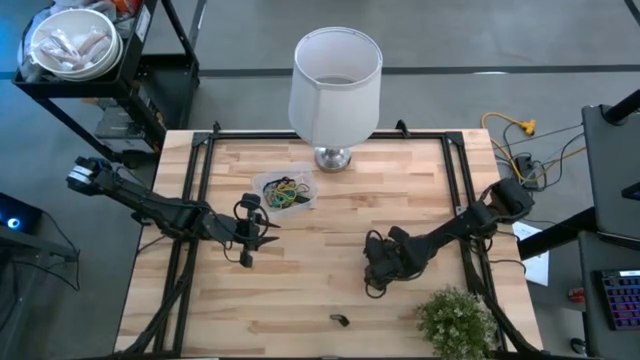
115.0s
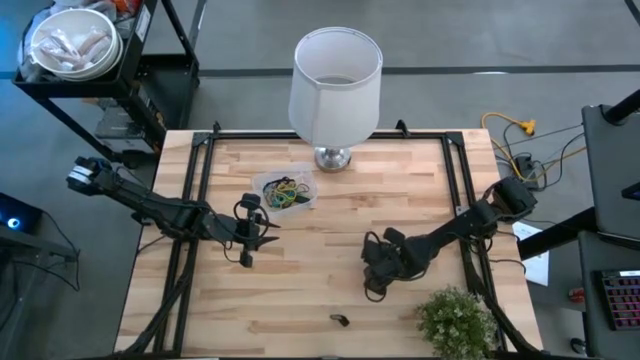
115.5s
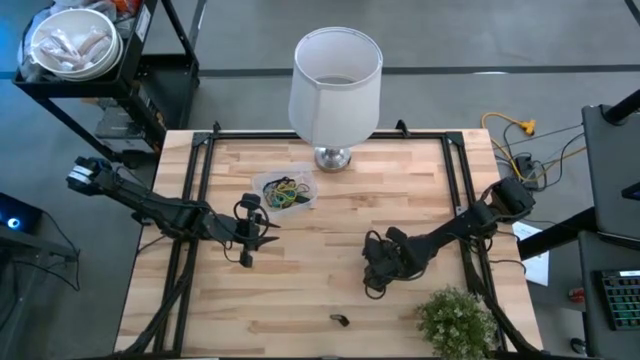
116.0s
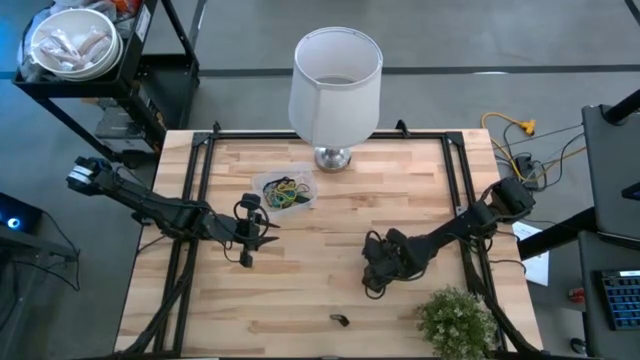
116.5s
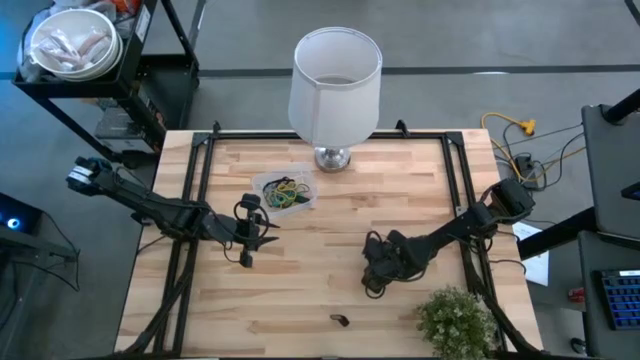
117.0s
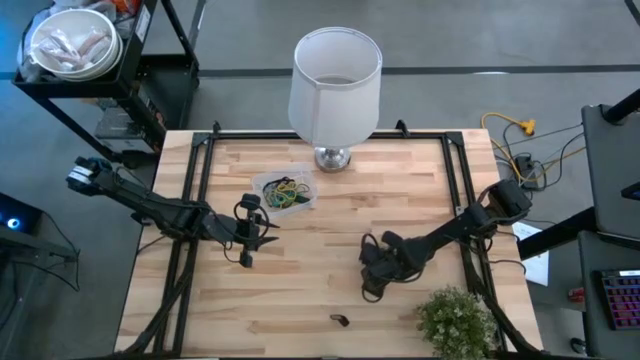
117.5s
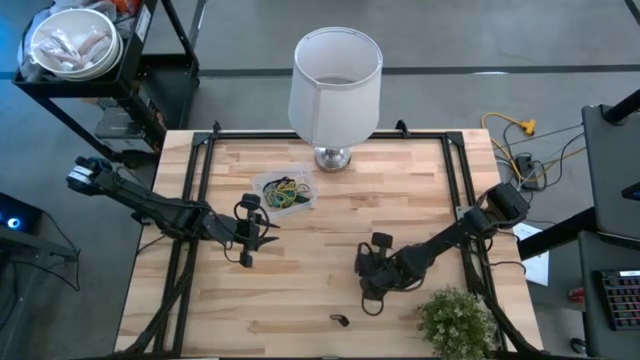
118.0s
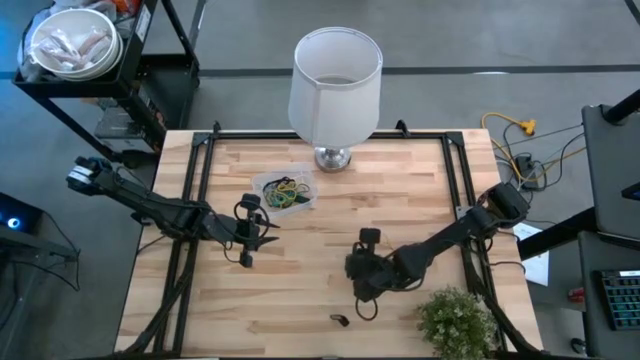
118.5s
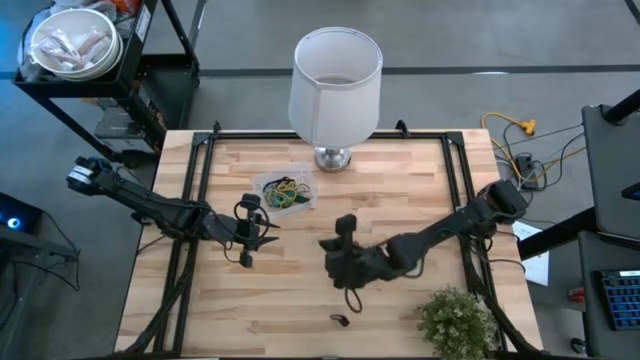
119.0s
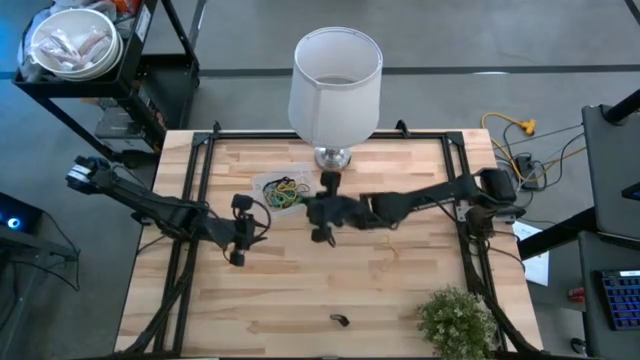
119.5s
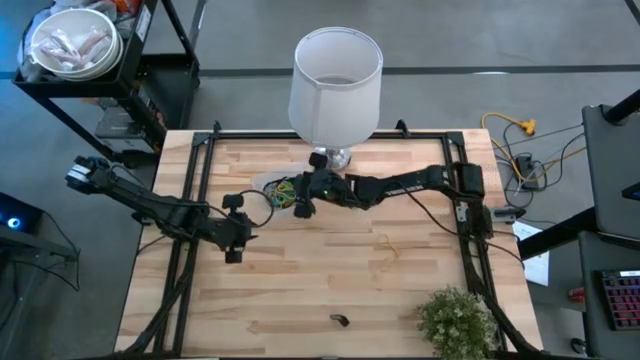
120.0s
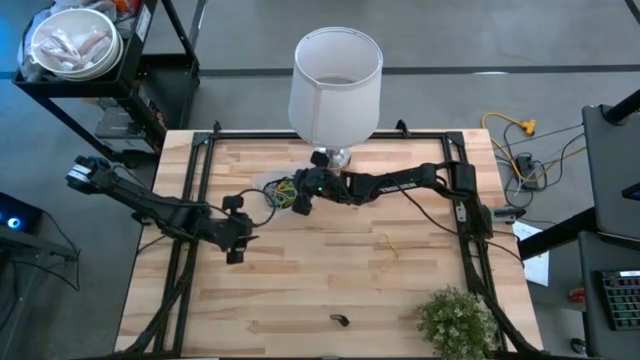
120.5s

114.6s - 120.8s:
Task: Pick and place rubber bands into bin
Put the green rubber band into the transparent bin

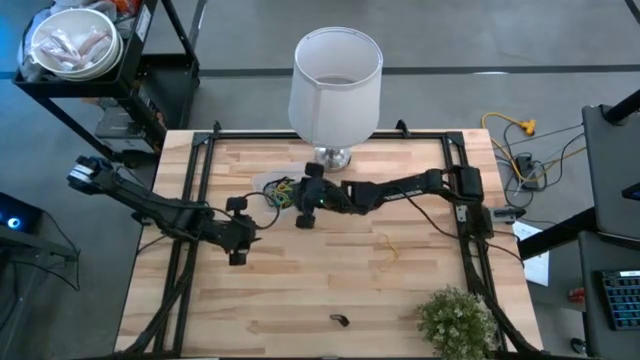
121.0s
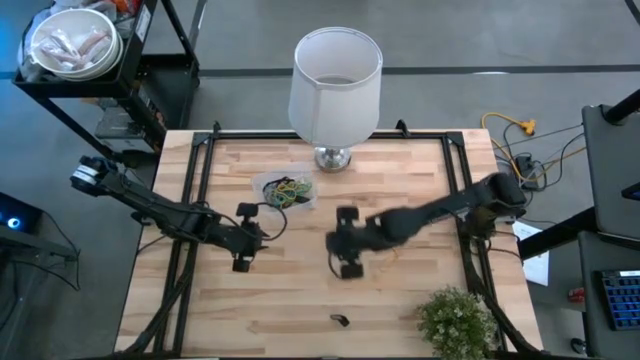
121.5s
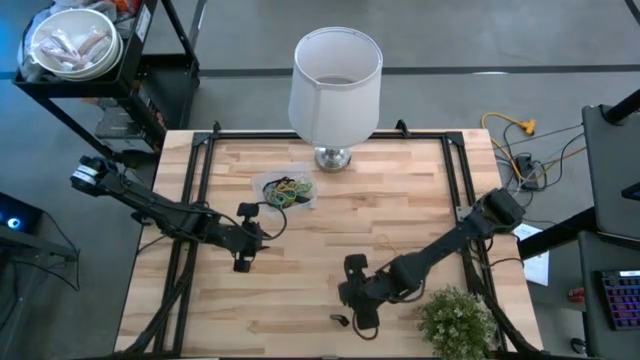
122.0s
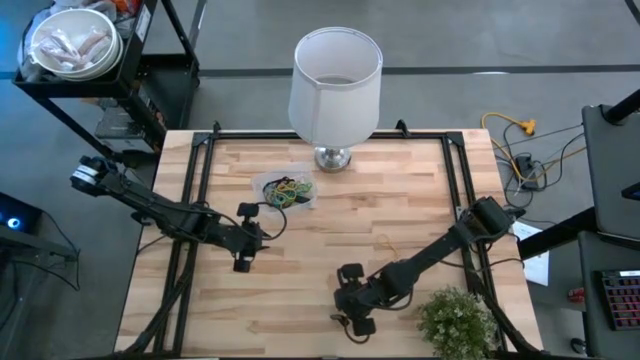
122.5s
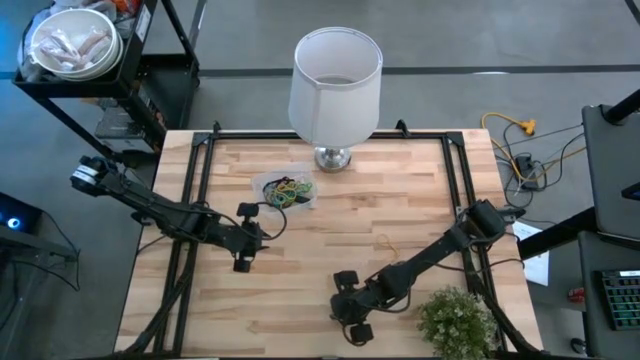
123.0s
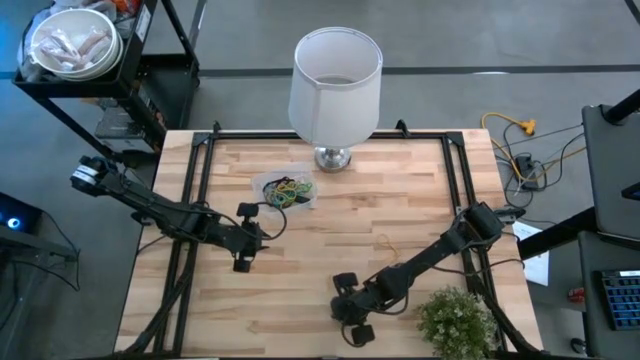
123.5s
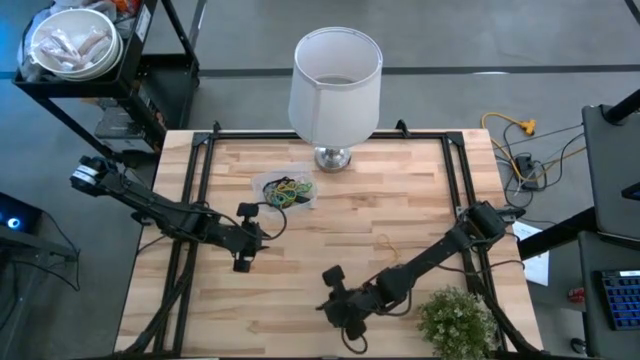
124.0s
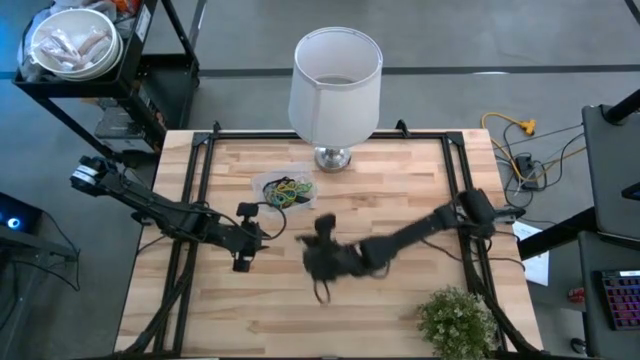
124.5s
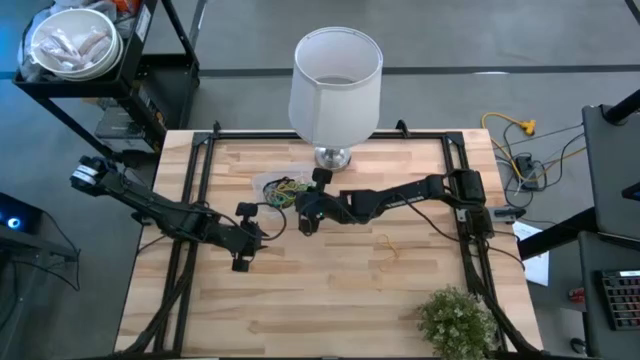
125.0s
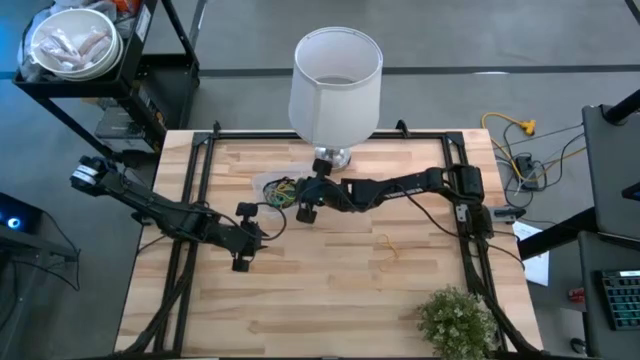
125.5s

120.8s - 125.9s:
Put the black rubber band into the transparent bin

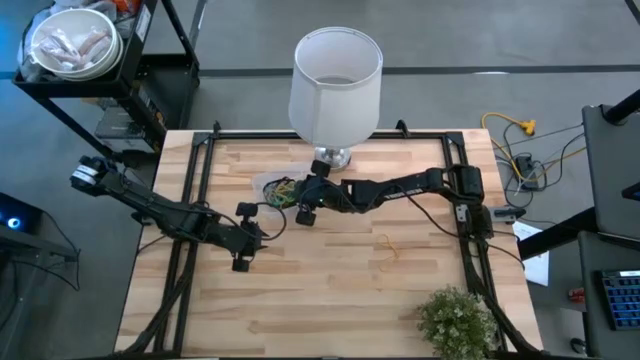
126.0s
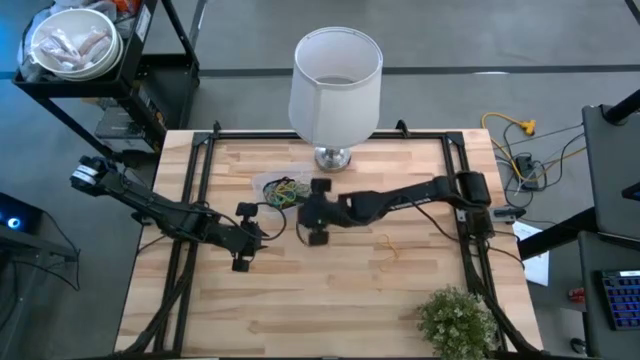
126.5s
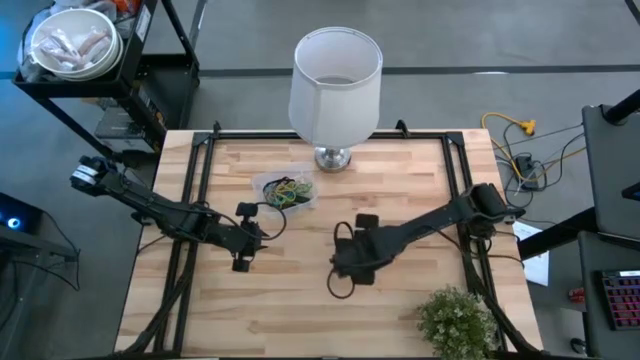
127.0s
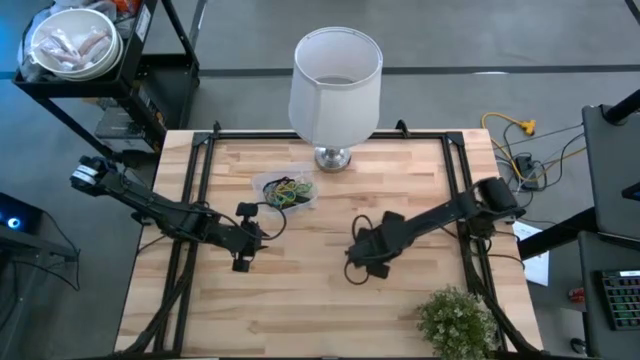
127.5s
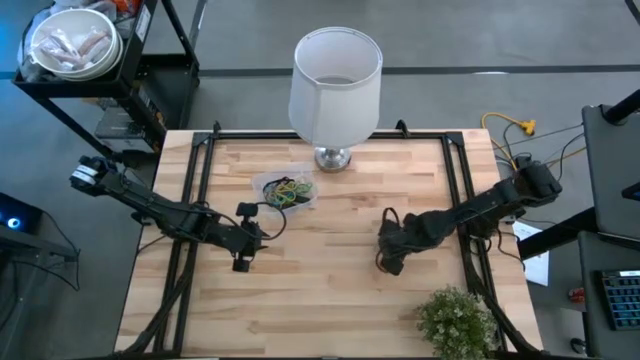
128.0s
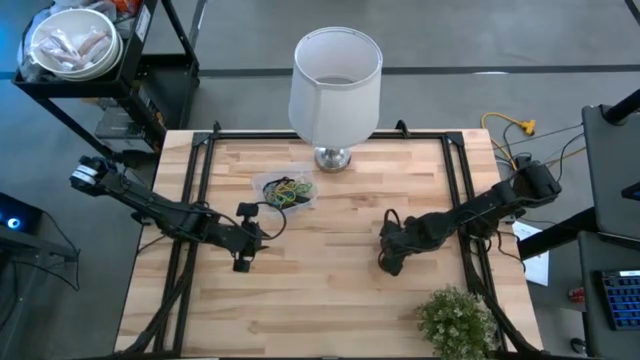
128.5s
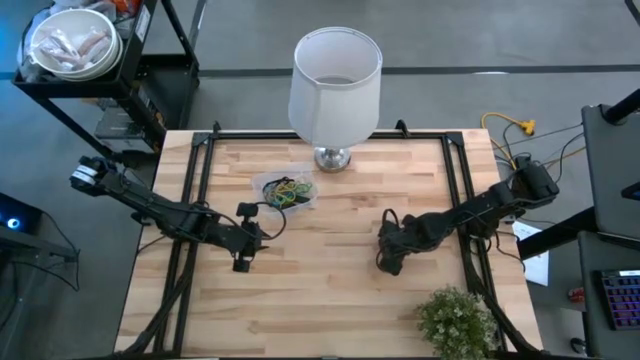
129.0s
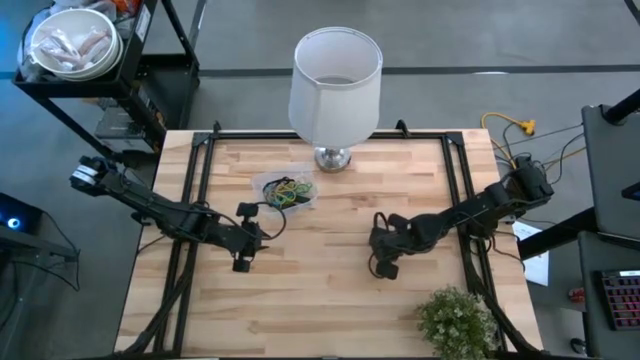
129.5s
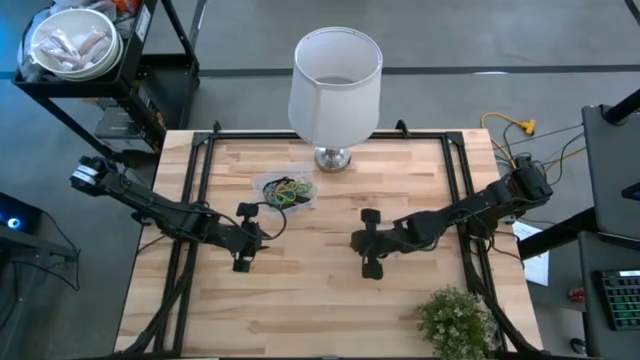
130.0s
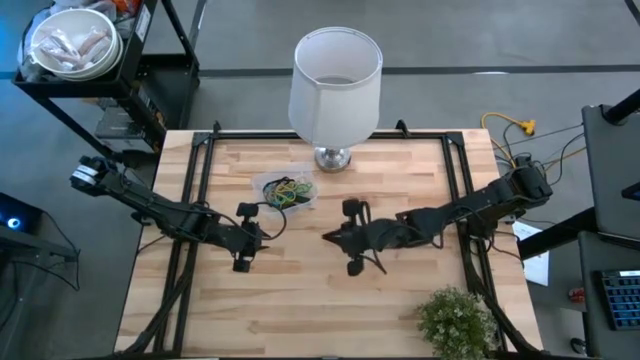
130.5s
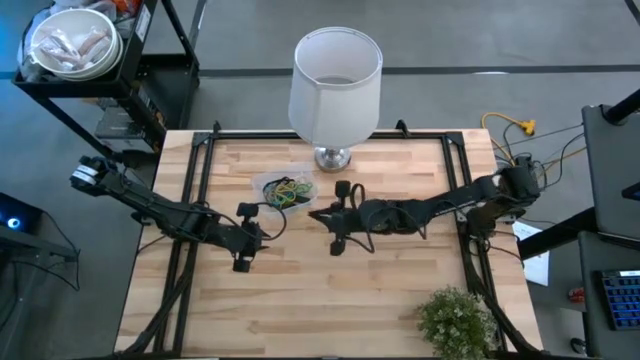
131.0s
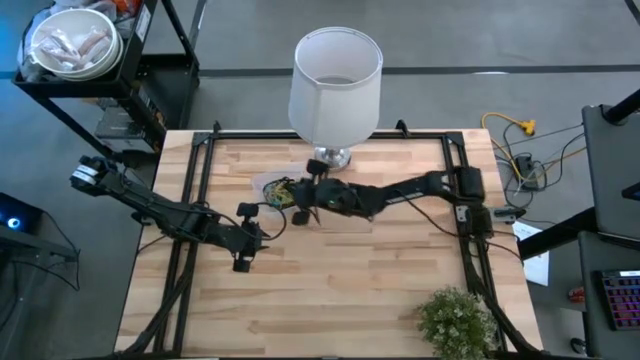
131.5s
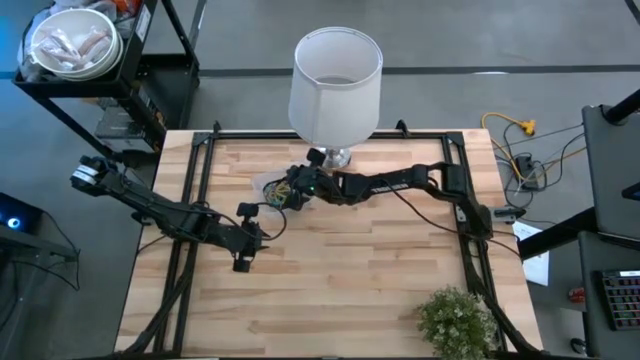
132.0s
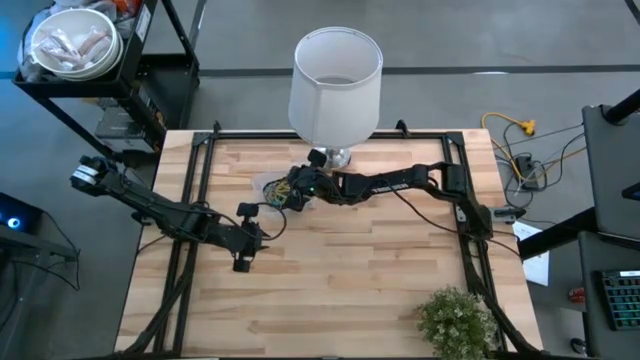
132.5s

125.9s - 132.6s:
Put the yellow rubber band into the transparent bin

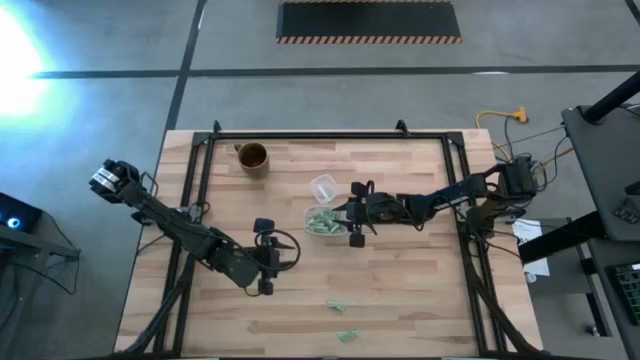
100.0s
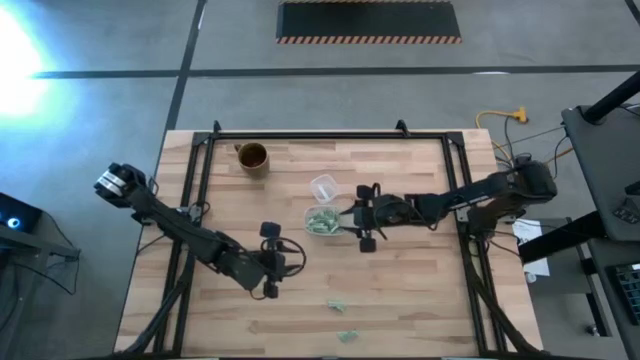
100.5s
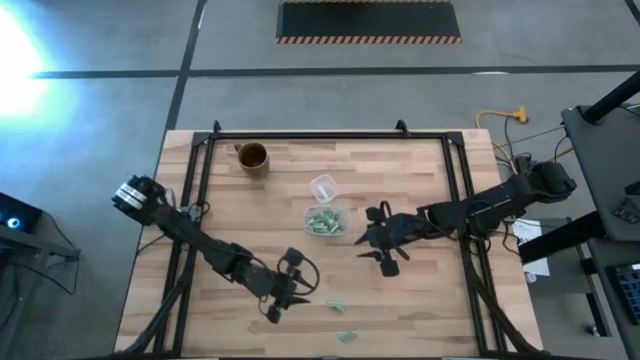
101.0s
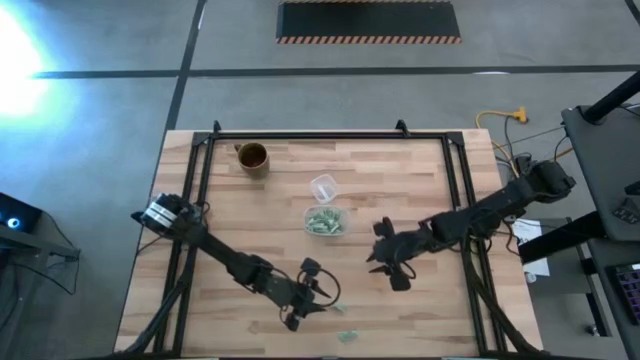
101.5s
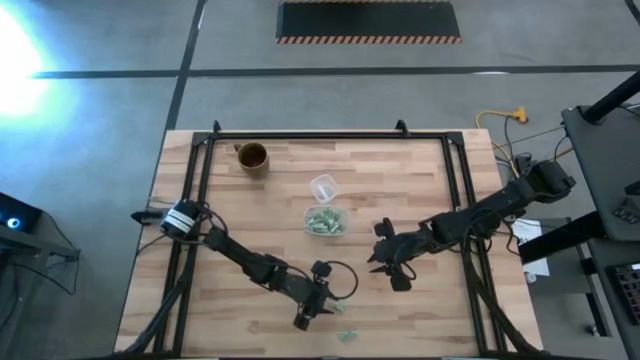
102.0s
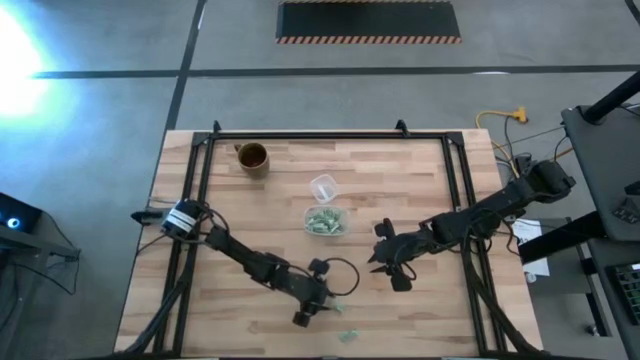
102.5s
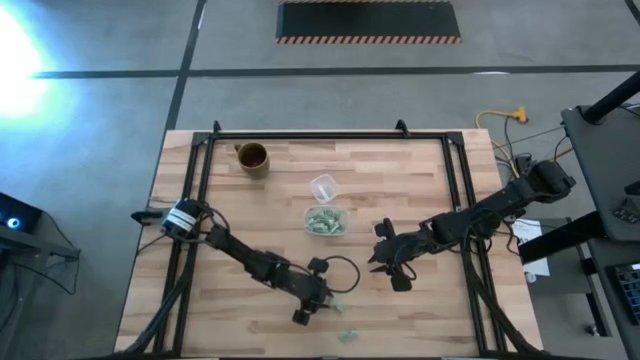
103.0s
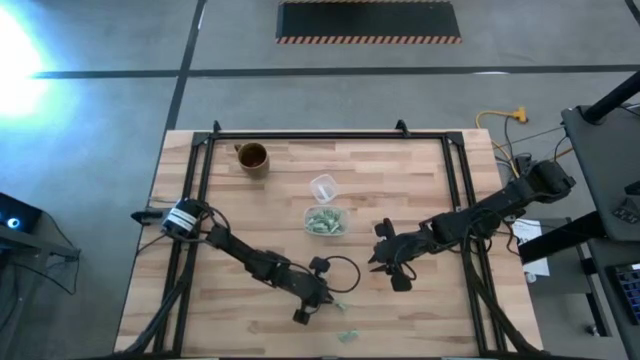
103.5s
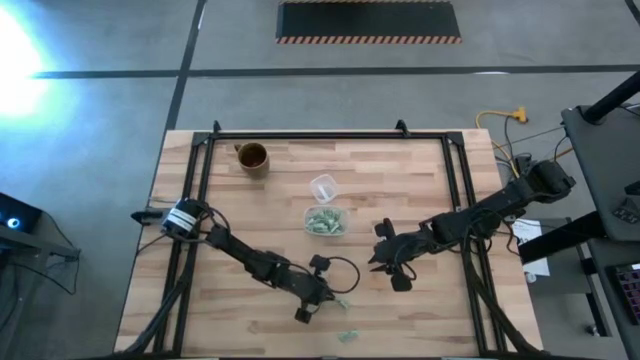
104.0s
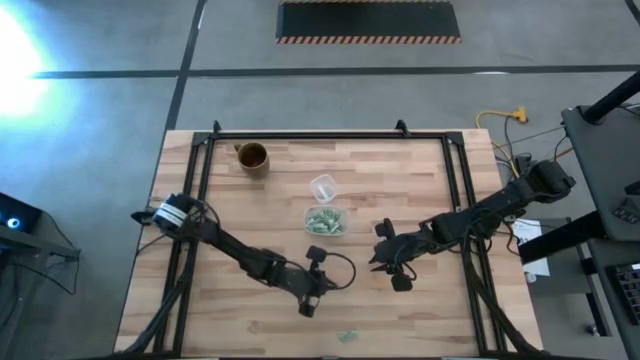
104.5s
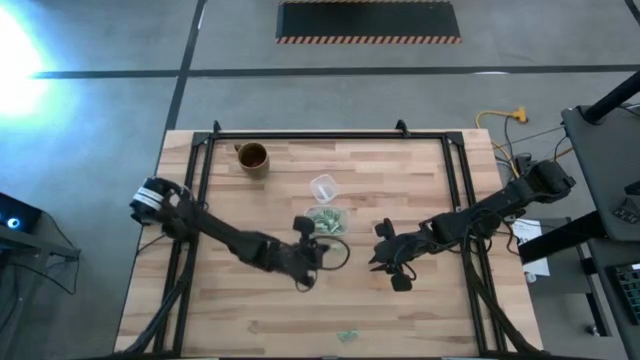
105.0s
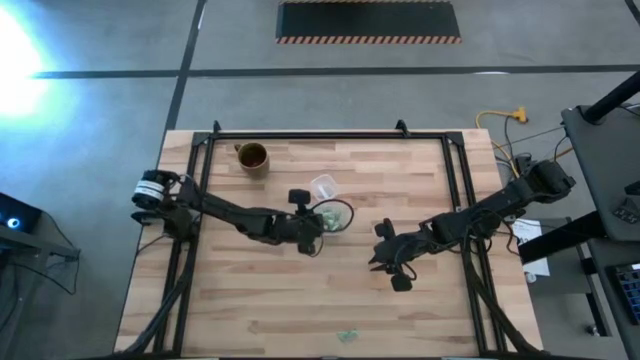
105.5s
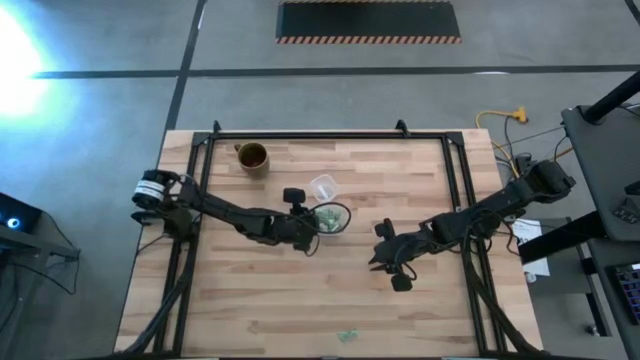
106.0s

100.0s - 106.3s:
Task: Pick and place Stevia / Truvia into bins
Put the stevia packet into the bottom transparent container
